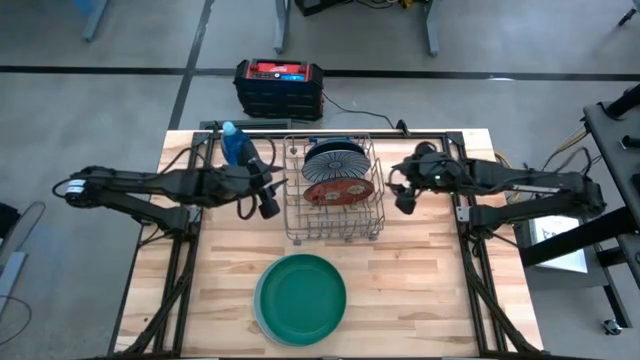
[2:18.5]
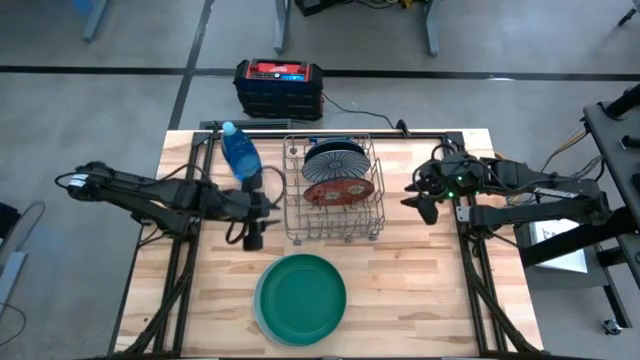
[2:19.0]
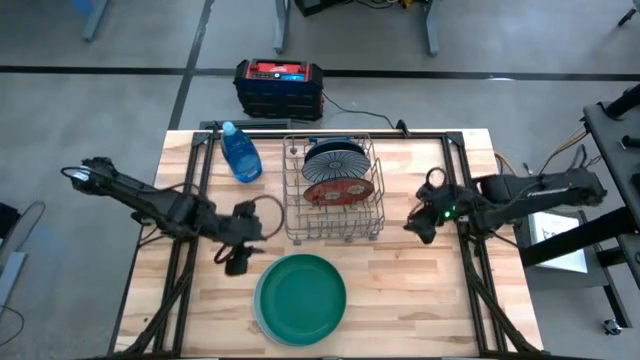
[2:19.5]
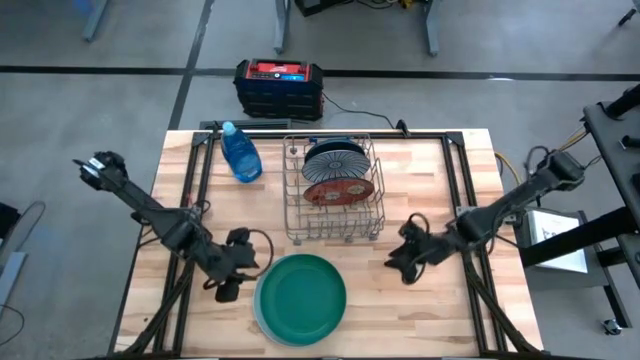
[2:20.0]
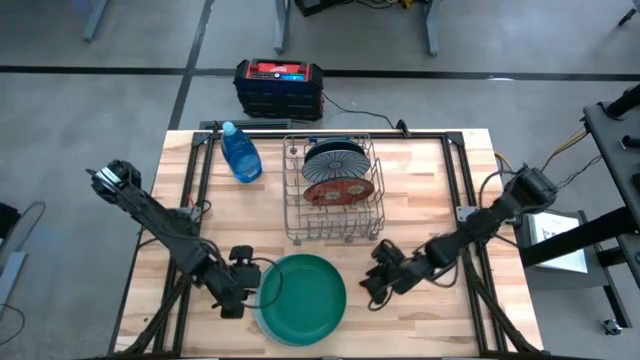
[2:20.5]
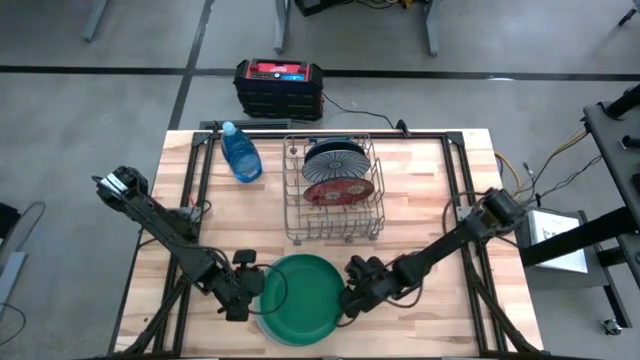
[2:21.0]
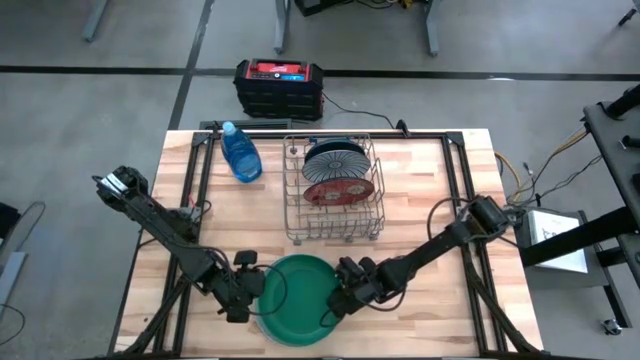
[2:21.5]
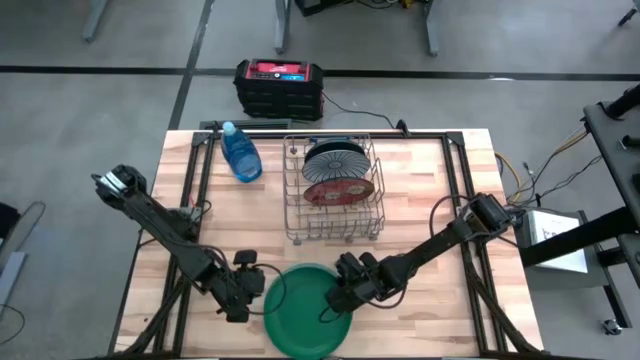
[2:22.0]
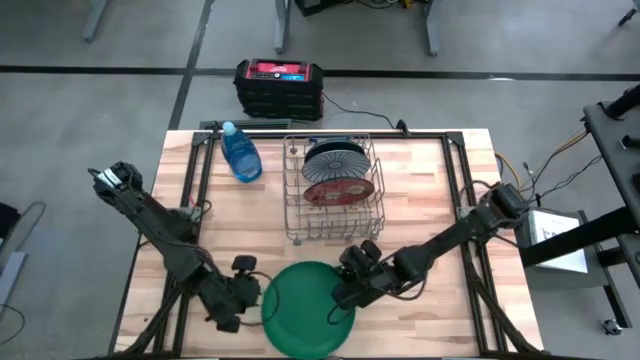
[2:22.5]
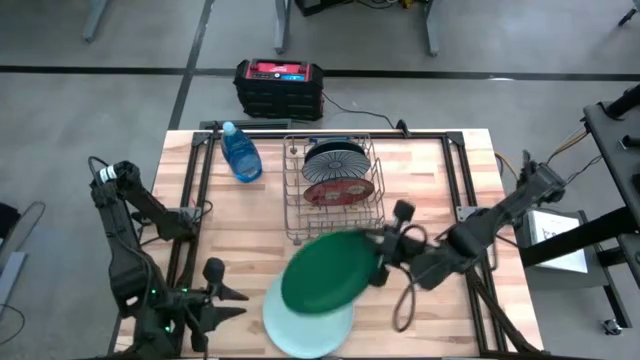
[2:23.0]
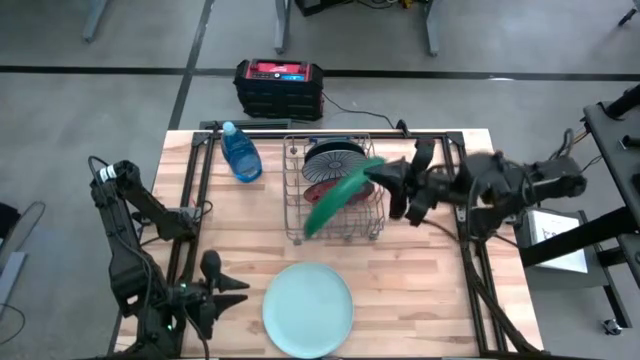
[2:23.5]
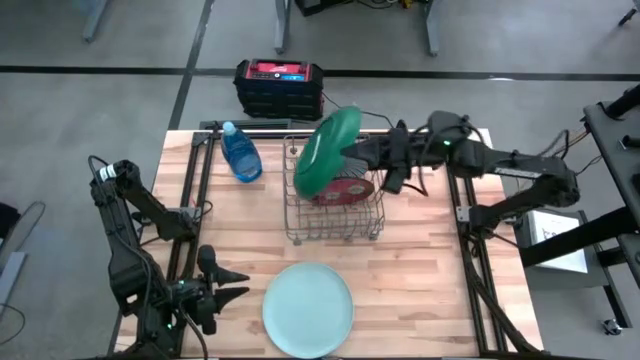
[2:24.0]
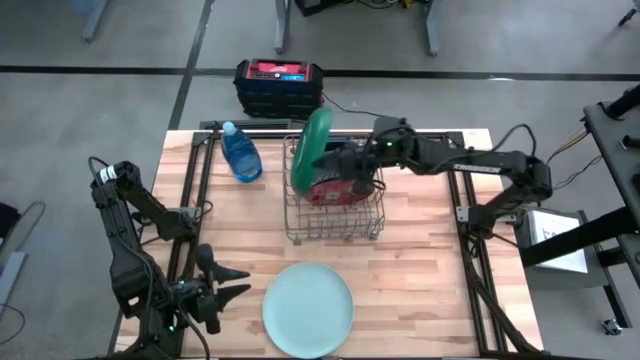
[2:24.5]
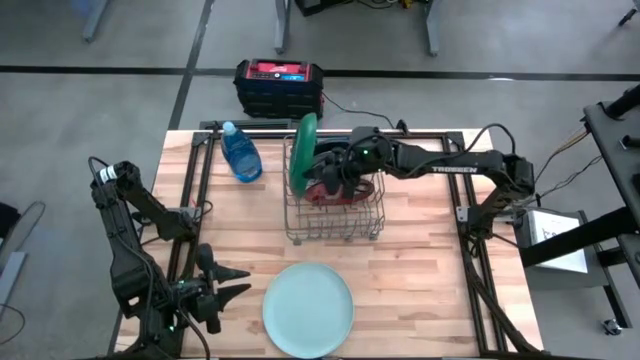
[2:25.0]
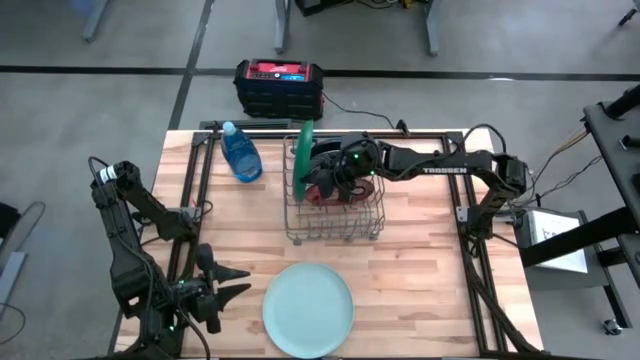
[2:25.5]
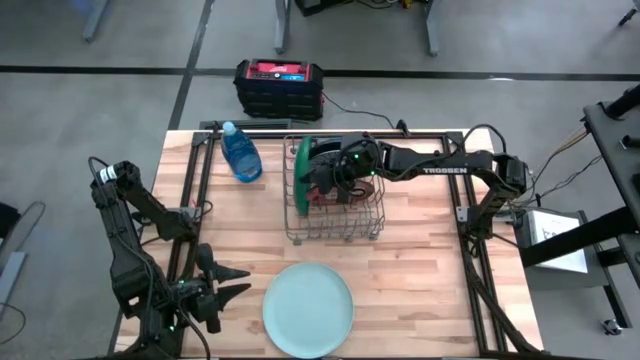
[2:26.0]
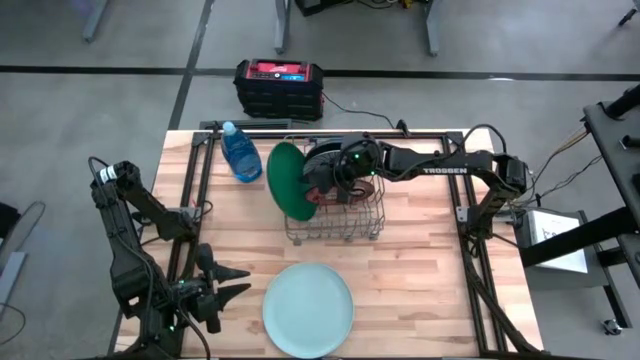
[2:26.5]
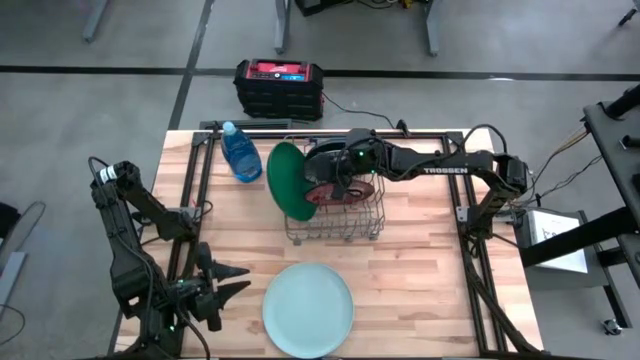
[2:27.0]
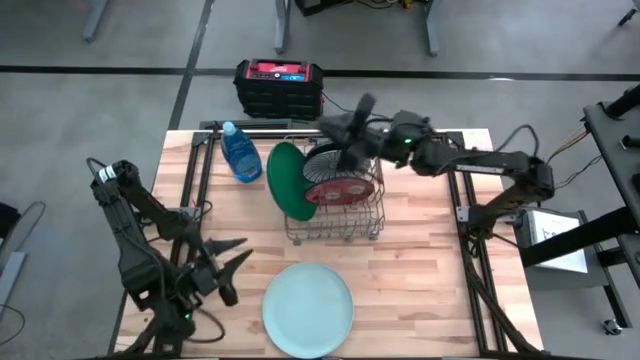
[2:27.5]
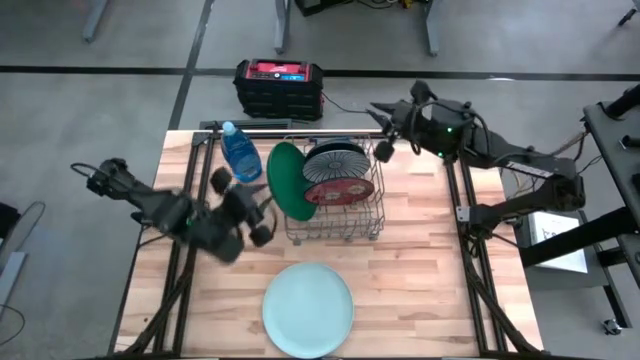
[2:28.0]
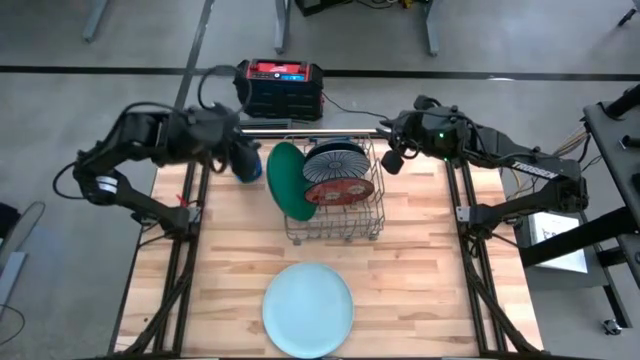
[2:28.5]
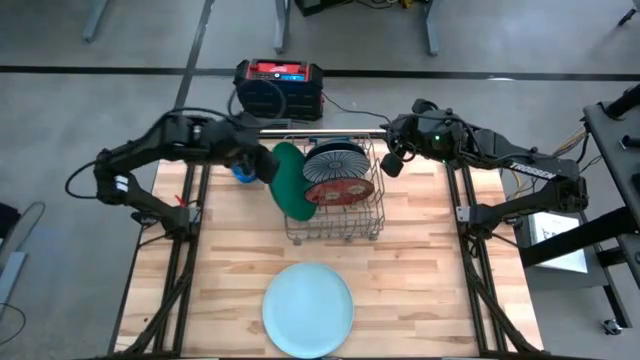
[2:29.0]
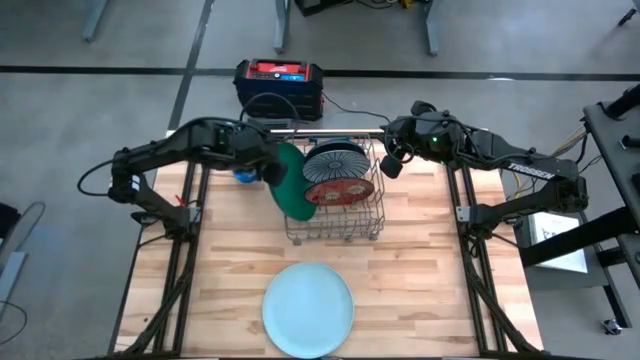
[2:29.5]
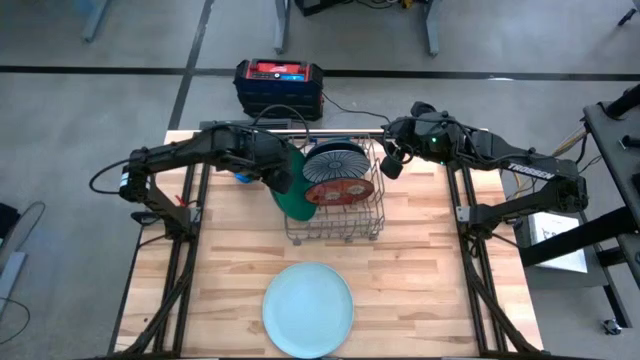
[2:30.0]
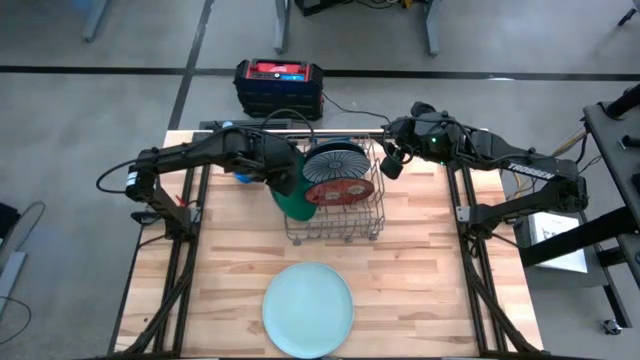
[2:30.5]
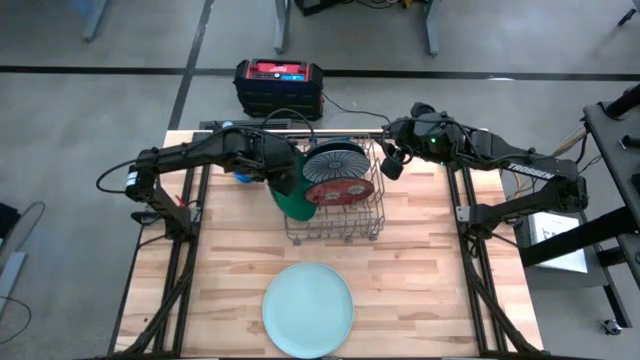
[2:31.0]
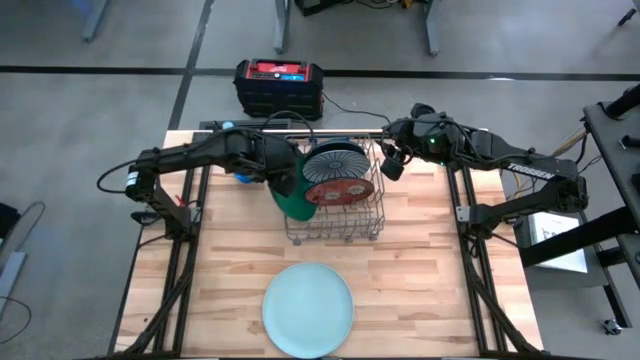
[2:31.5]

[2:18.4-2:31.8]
Task: Sort dishes
Put the green plate into the gray dishwasher rack

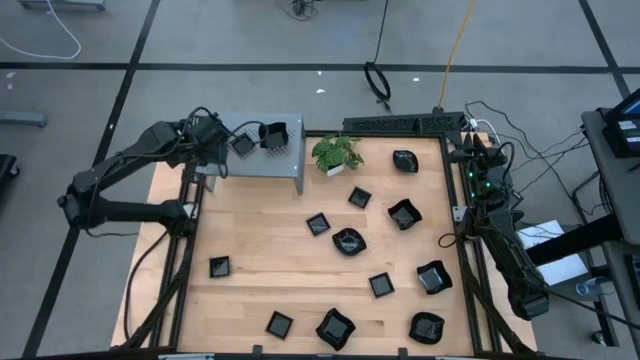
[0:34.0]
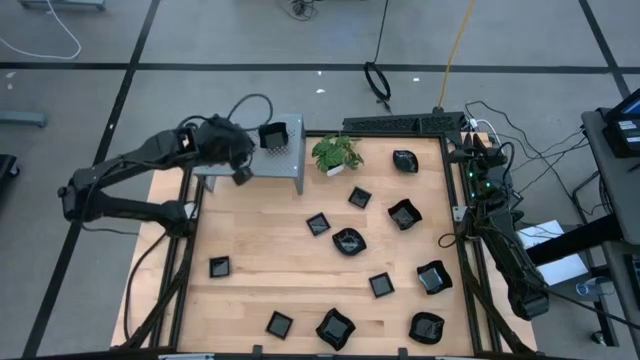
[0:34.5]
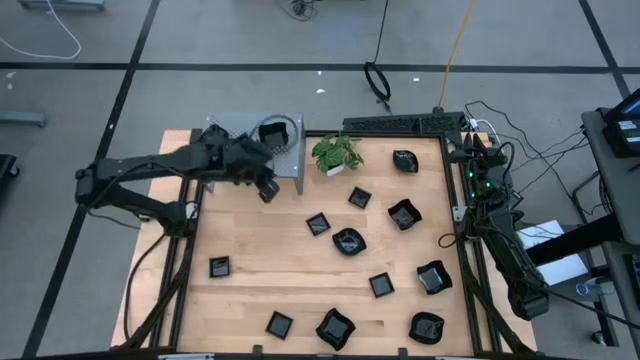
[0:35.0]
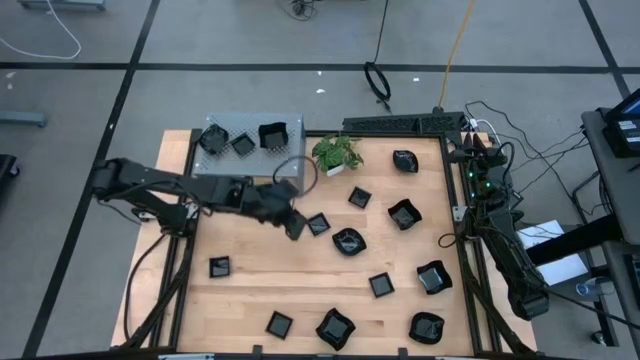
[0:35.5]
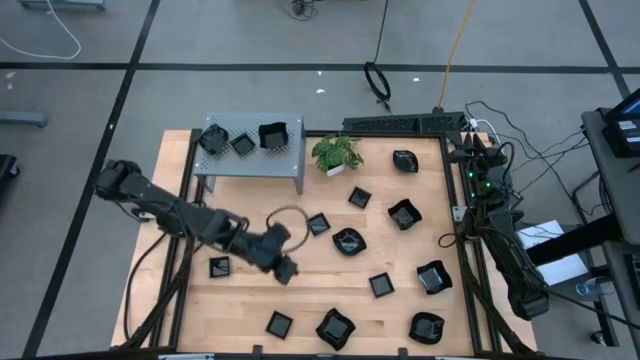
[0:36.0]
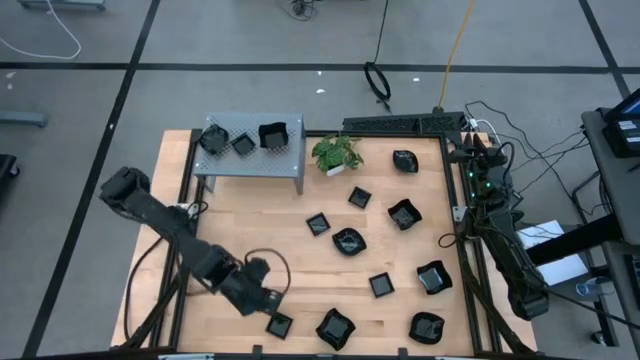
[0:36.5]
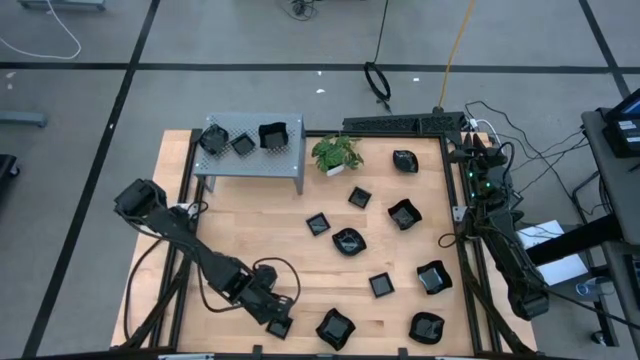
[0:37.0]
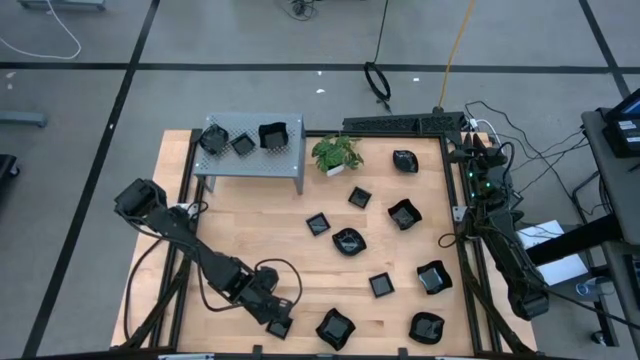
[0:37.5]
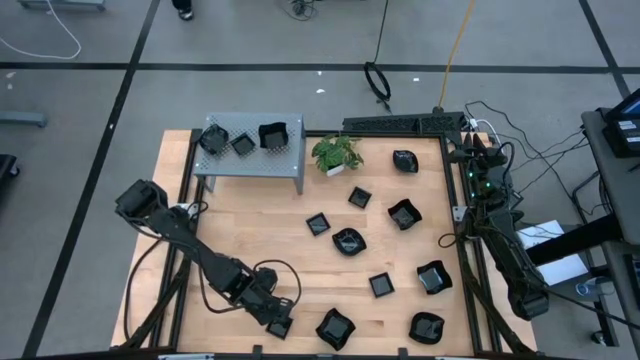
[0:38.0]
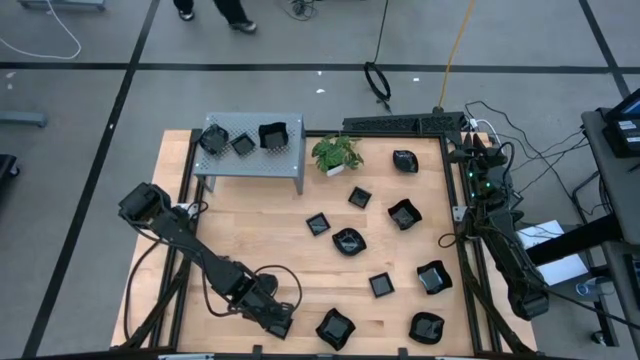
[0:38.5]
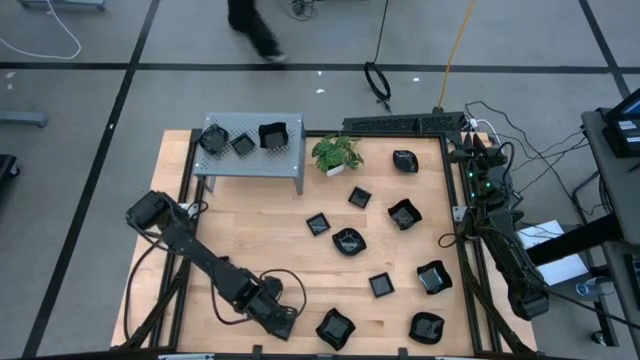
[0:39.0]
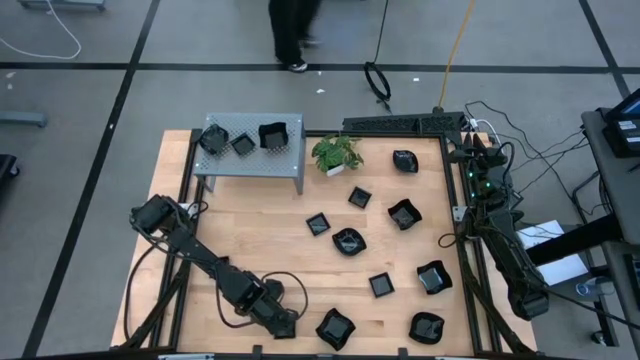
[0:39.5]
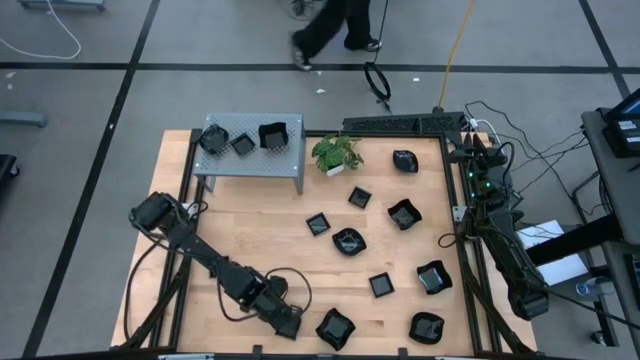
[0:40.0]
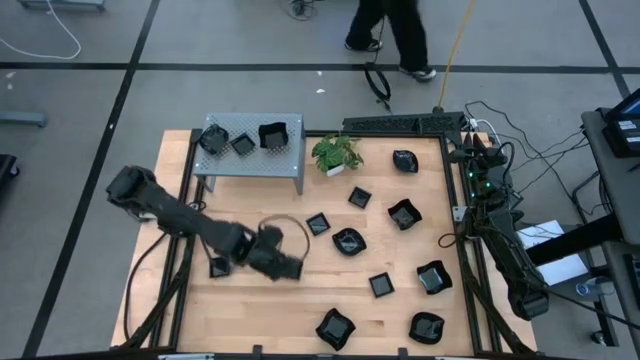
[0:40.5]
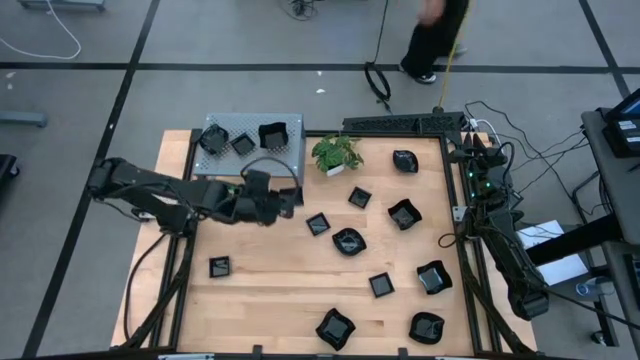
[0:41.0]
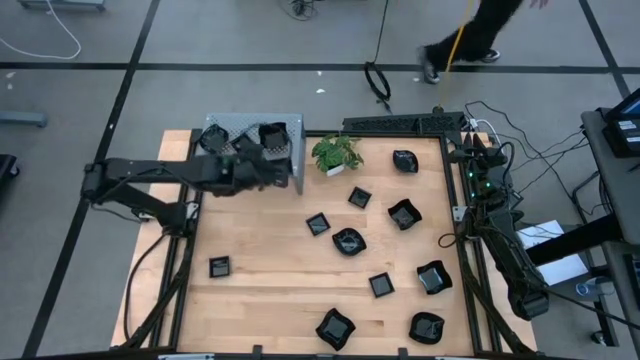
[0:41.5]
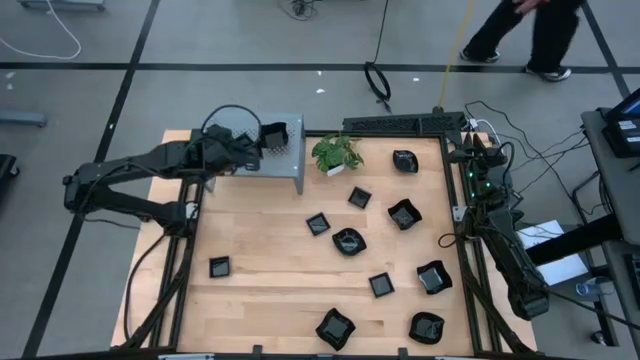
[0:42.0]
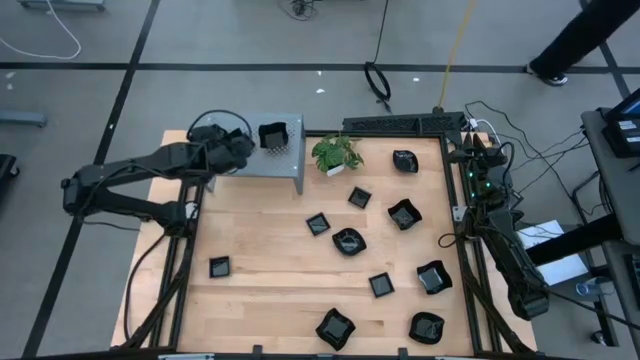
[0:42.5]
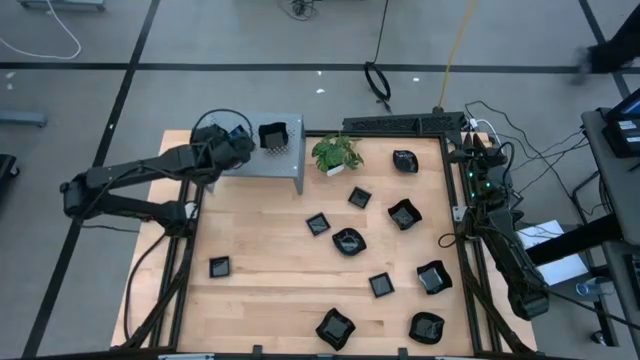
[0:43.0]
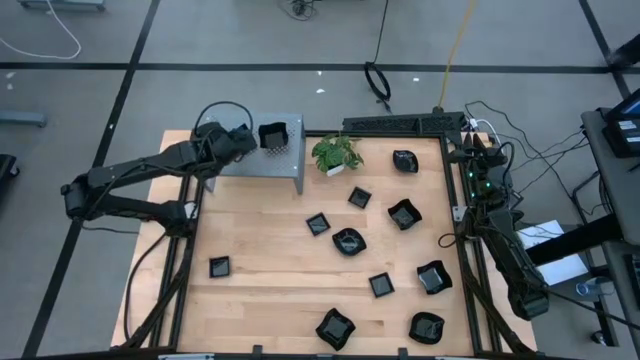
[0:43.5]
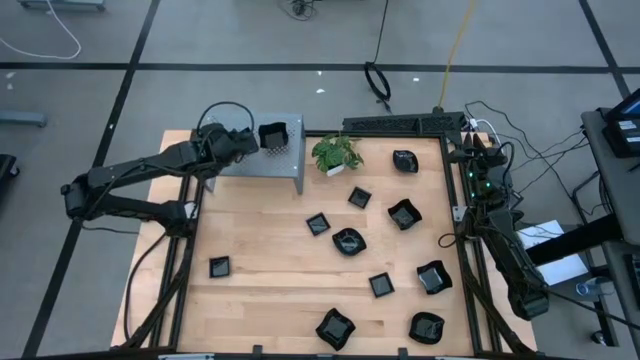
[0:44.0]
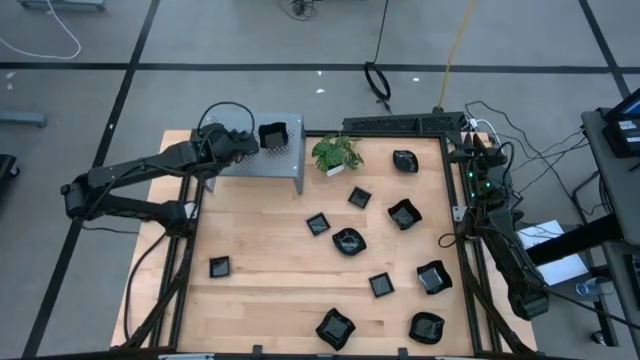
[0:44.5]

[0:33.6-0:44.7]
Task: Pick & Place Mini shaped plates
Stack the black square plate on top of the other black square plate on the shelf
